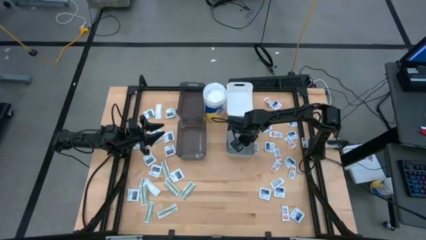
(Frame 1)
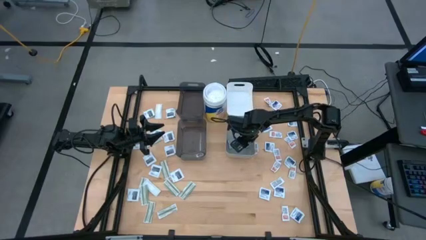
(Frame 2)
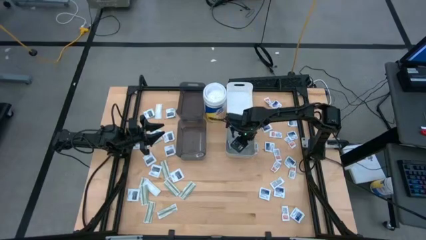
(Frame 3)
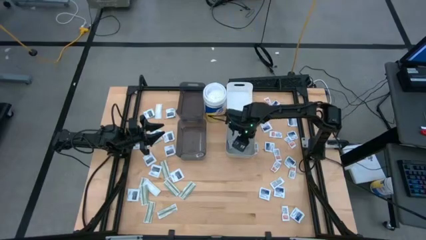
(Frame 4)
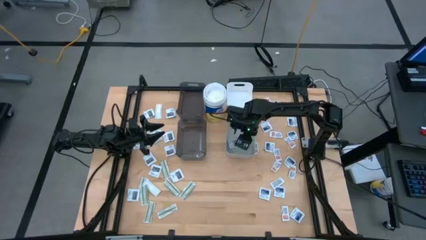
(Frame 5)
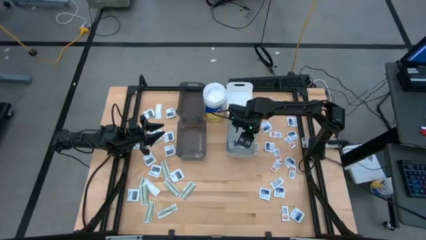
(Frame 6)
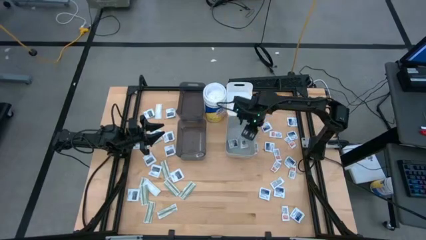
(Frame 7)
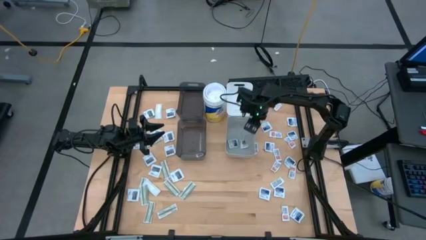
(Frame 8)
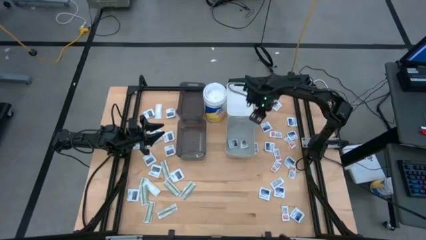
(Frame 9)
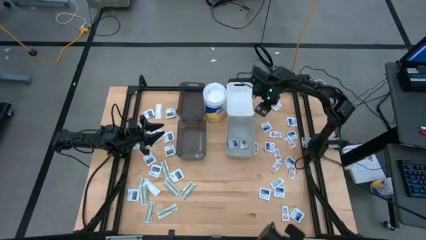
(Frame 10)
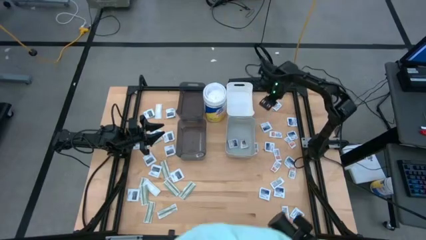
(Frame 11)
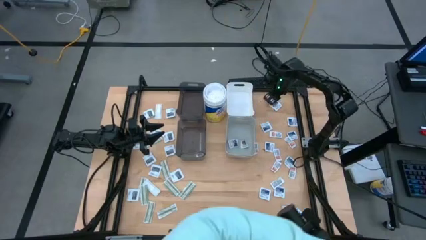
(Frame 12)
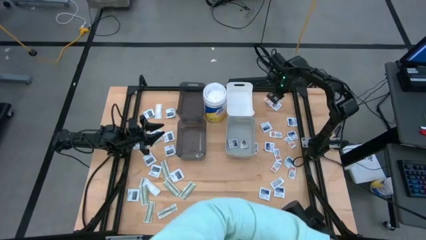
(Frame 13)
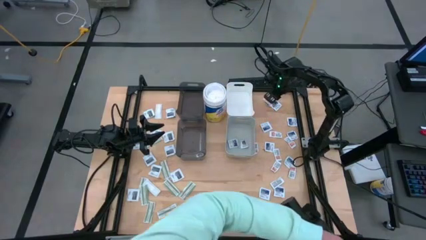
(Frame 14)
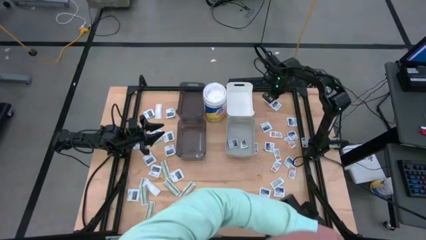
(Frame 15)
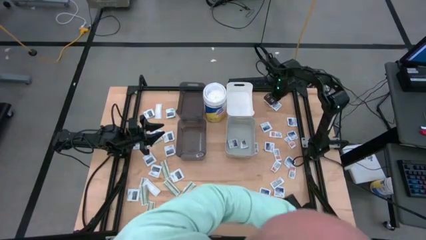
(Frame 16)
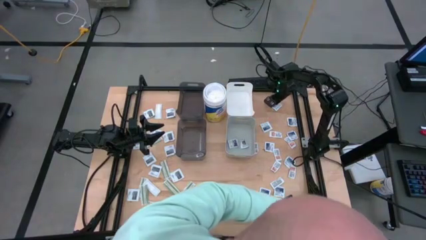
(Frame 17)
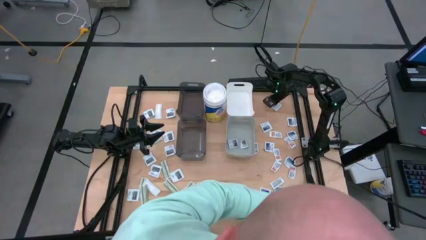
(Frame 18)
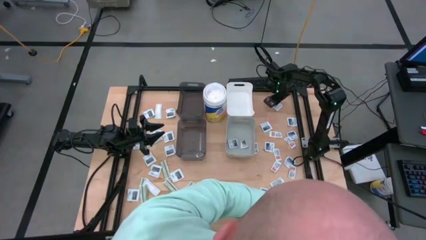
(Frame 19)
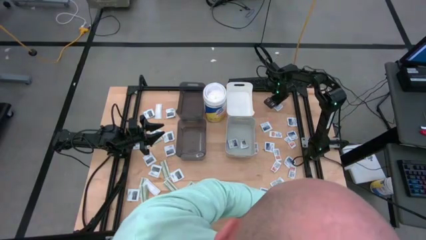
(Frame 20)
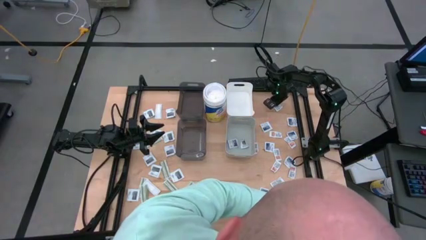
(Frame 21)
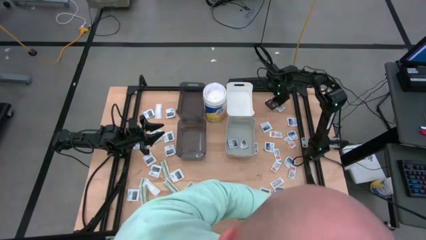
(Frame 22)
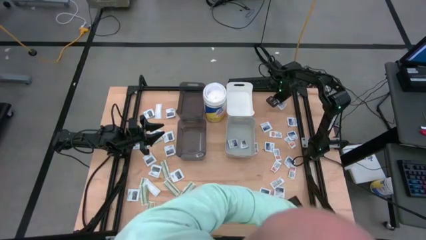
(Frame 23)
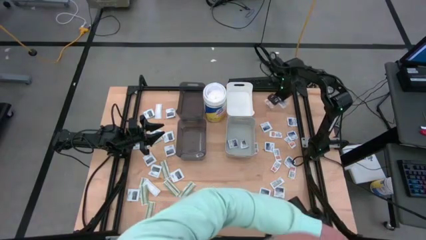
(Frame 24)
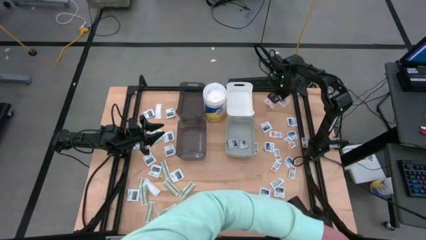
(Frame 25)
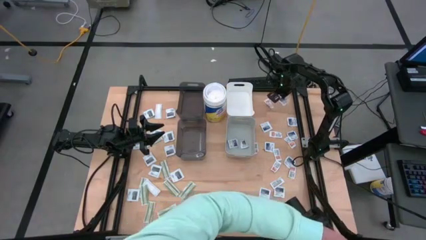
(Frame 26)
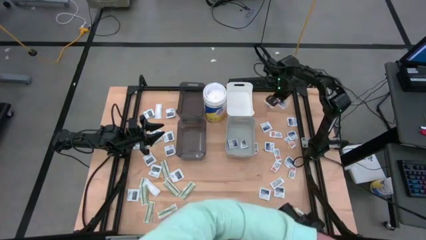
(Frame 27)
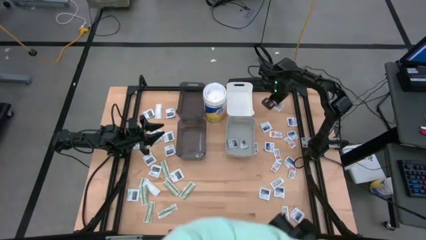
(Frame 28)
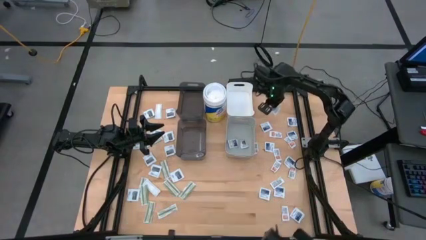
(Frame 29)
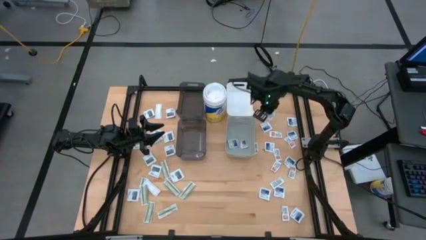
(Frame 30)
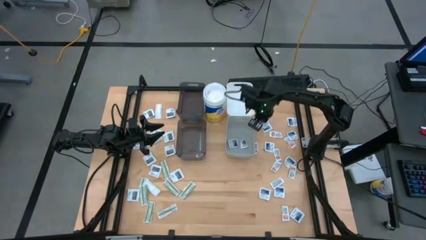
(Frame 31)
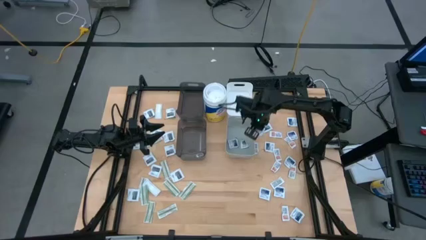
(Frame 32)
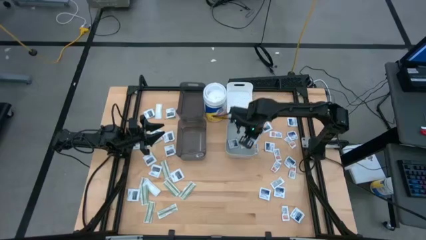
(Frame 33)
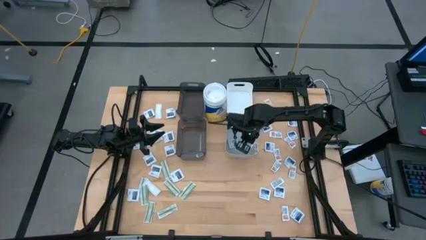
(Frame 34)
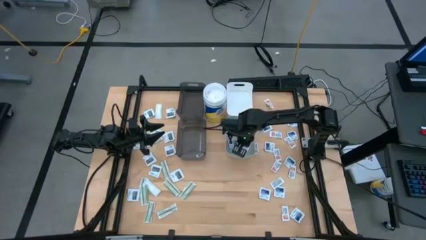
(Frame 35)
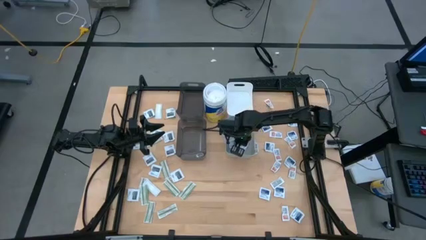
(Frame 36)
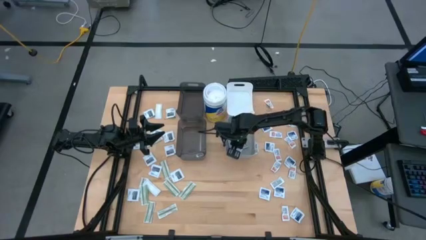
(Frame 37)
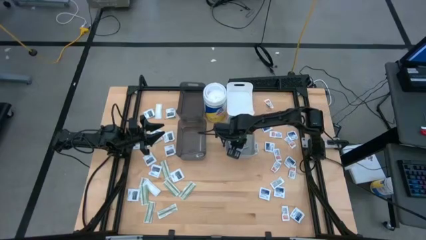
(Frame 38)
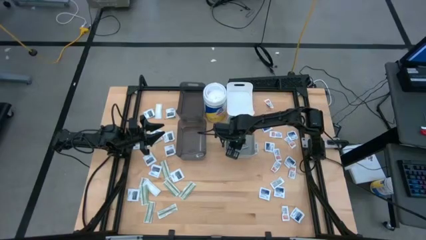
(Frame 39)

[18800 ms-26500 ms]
Task: Pick & Place First Aid Supplies
Put the alcohol pad into the gray bin

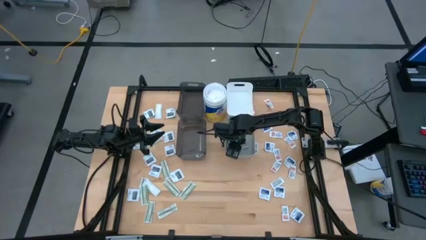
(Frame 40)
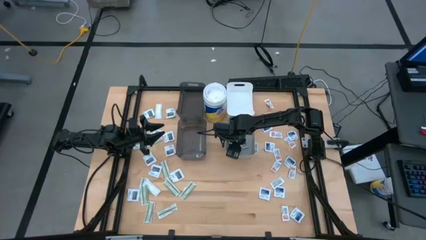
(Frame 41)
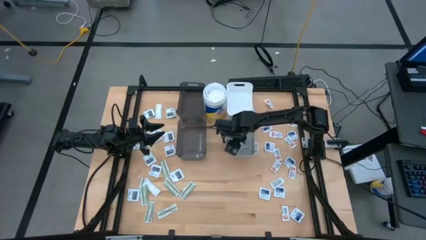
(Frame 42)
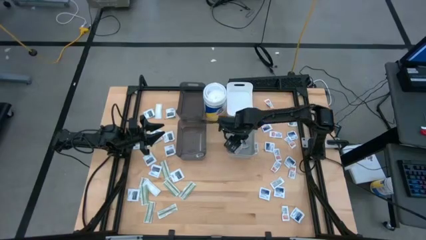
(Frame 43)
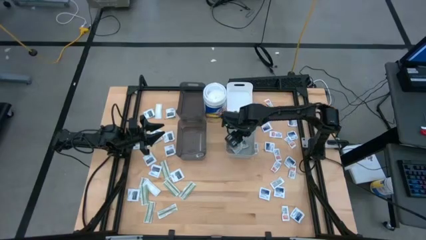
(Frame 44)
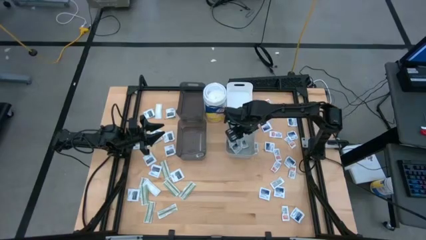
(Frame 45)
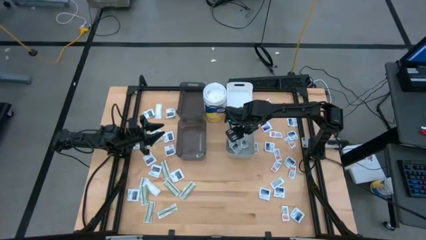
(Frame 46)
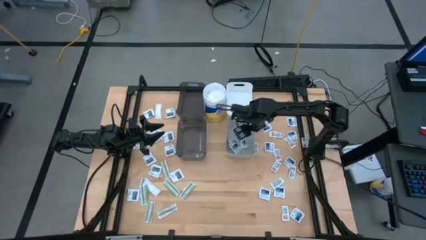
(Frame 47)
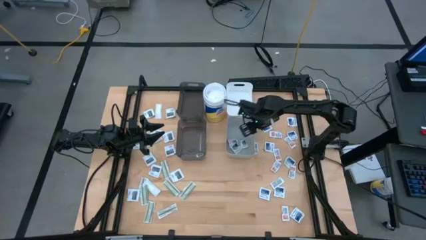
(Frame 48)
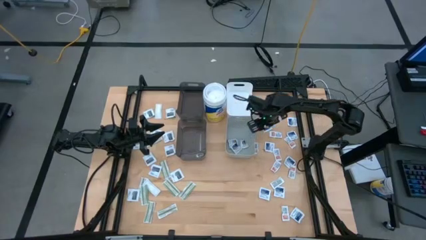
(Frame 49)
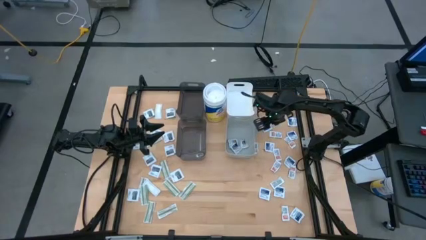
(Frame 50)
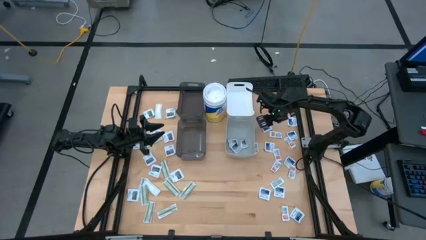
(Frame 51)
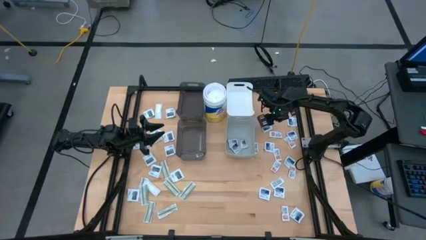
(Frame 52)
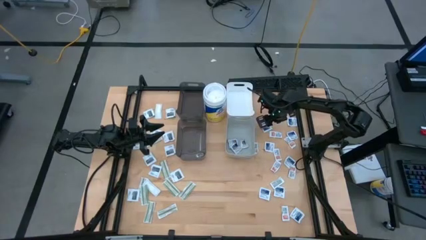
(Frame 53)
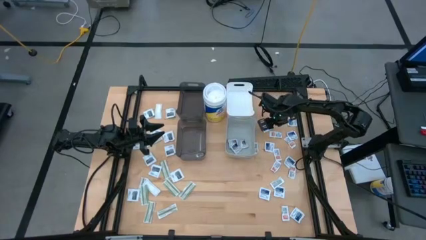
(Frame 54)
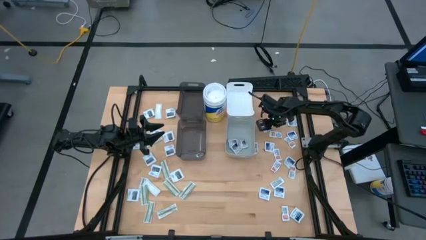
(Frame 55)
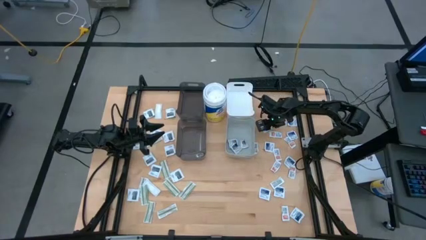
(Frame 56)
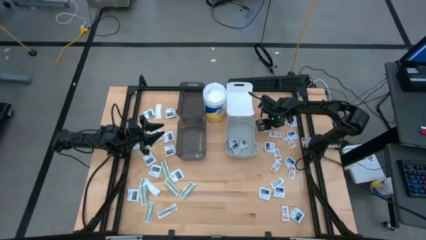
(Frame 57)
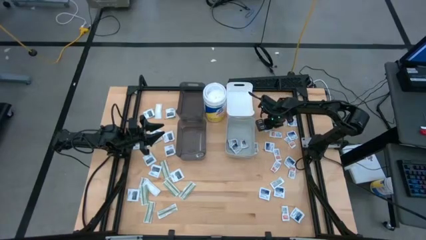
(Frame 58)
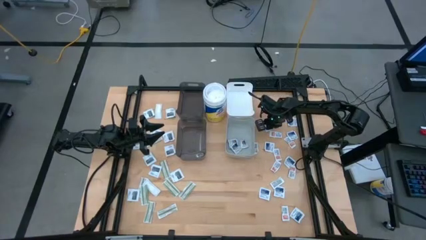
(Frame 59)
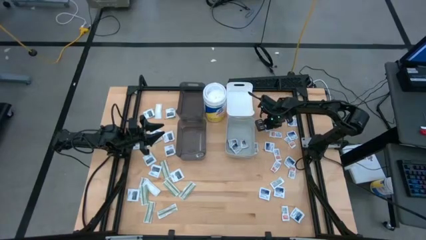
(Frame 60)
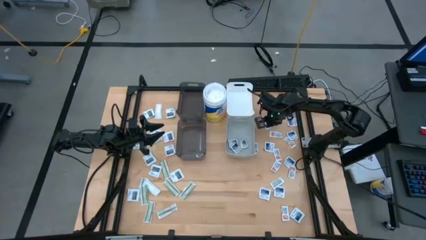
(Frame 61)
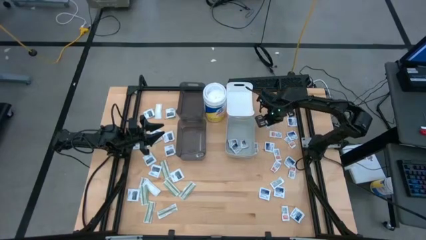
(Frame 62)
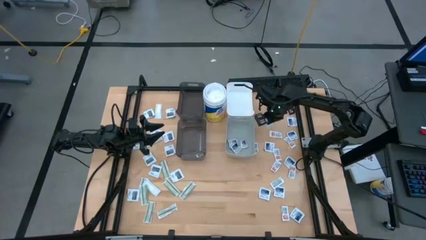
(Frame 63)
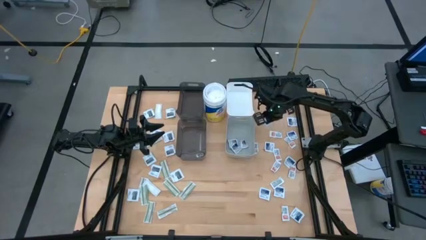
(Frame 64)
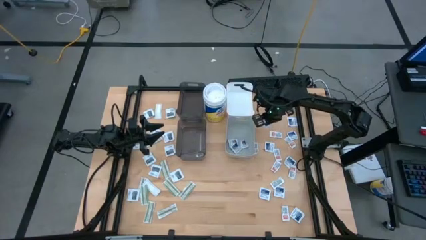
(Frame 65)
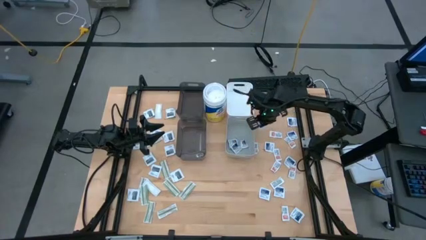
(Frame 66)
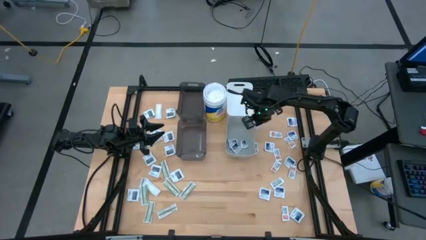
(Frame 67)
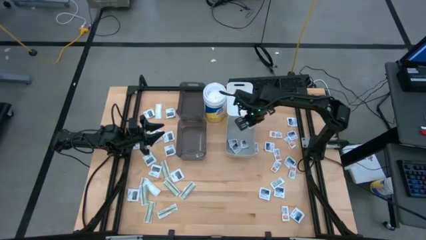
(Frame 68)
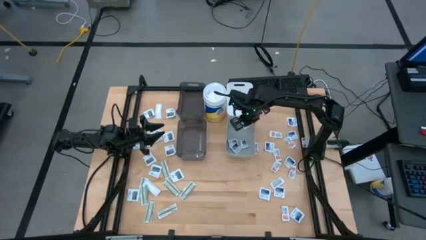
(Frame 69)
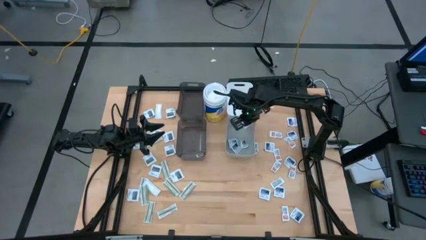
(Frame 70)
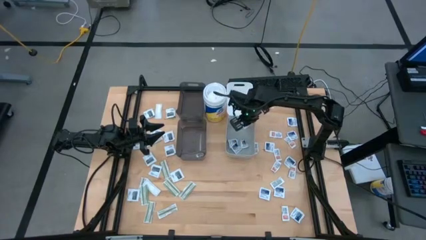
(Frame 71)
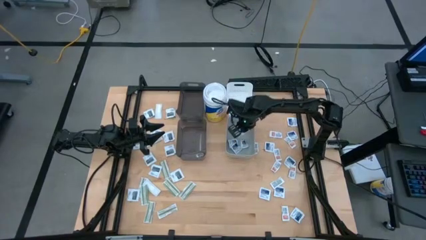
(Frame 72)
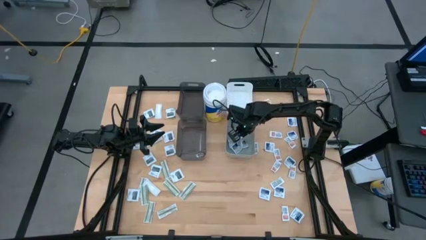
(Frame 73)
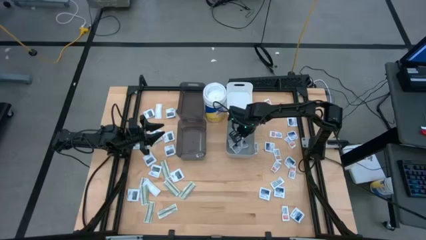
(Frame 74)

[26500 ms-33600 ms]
Put the alcohol pad into the gray bin
